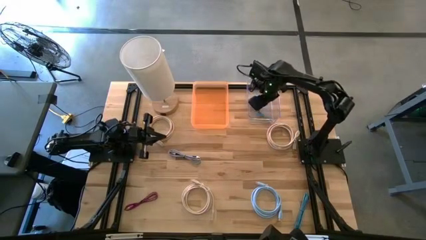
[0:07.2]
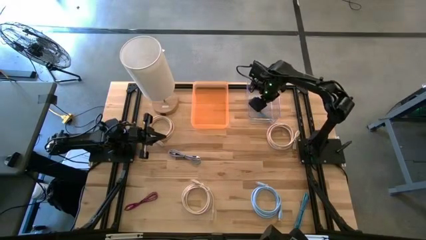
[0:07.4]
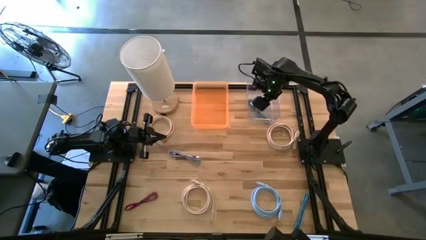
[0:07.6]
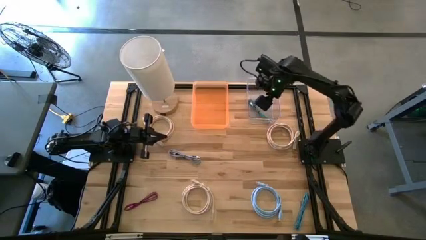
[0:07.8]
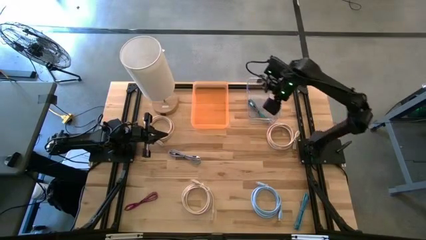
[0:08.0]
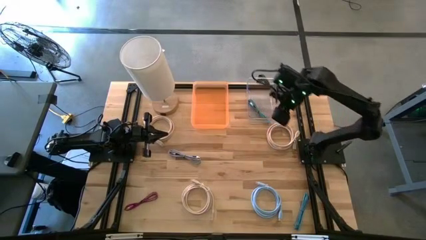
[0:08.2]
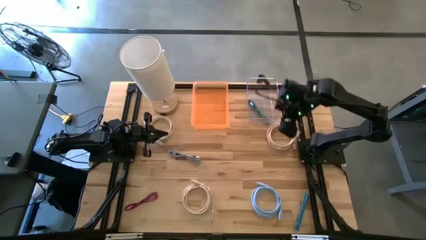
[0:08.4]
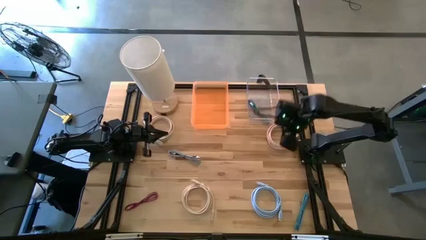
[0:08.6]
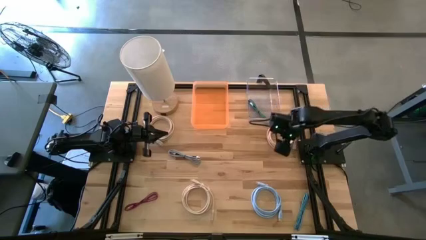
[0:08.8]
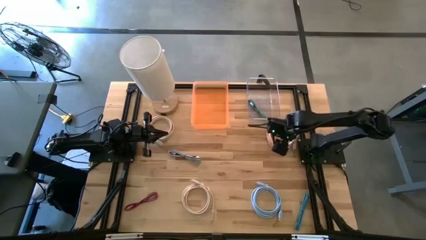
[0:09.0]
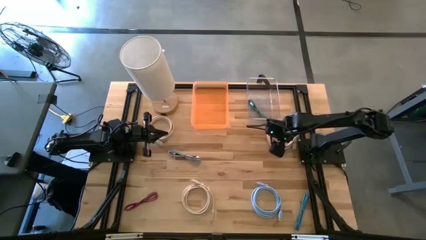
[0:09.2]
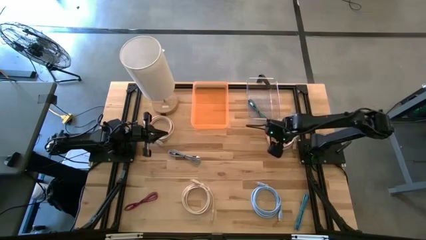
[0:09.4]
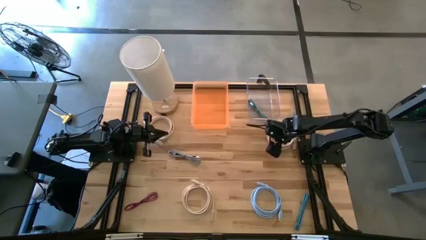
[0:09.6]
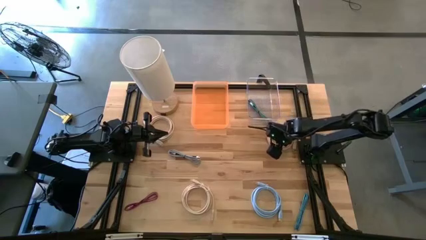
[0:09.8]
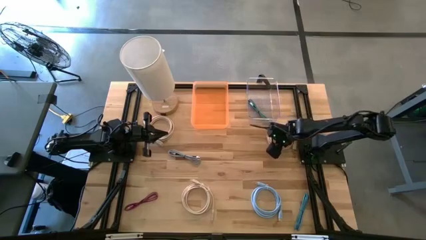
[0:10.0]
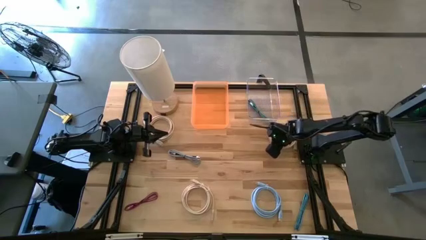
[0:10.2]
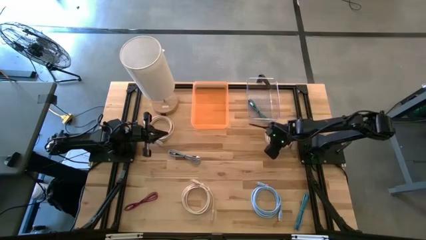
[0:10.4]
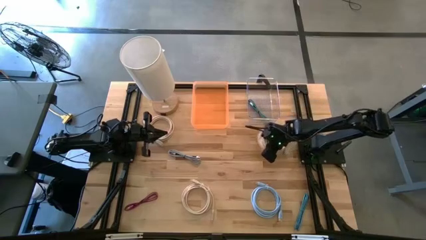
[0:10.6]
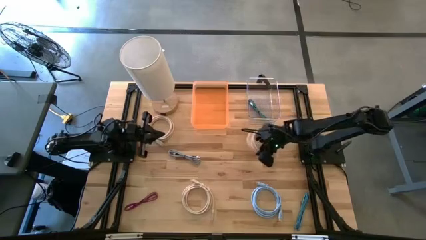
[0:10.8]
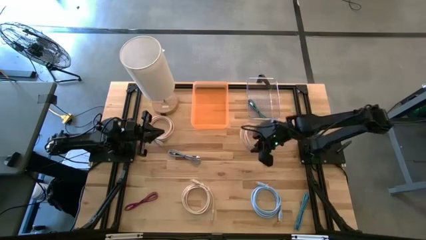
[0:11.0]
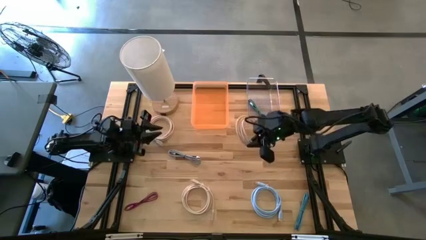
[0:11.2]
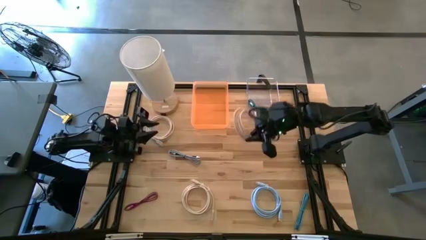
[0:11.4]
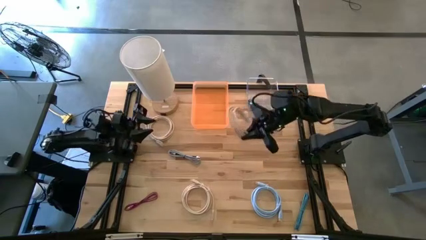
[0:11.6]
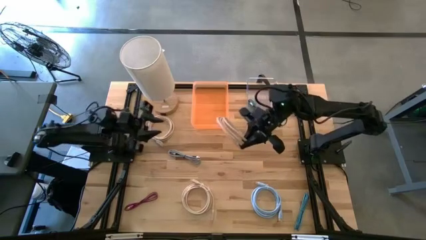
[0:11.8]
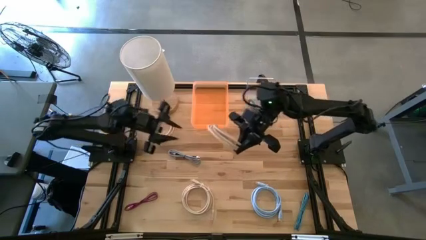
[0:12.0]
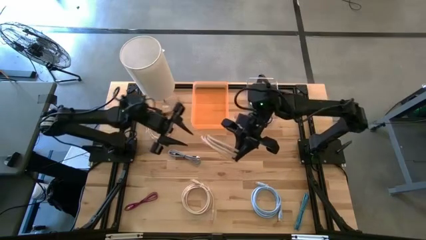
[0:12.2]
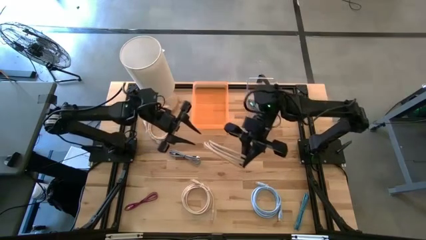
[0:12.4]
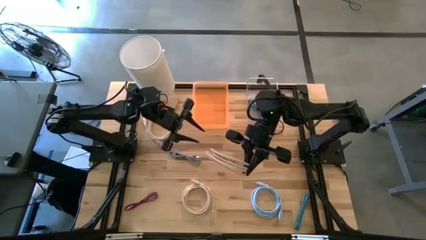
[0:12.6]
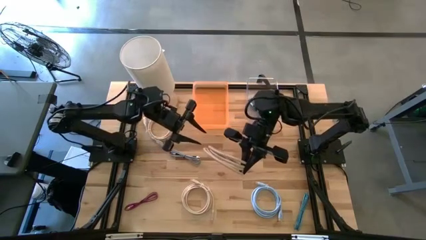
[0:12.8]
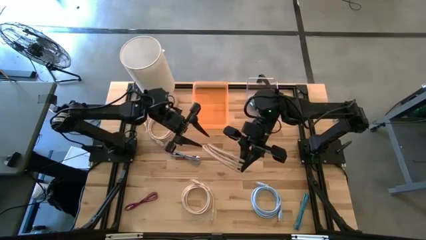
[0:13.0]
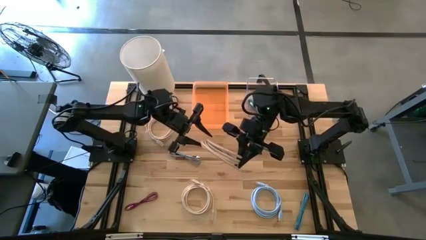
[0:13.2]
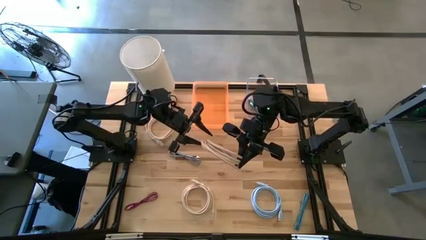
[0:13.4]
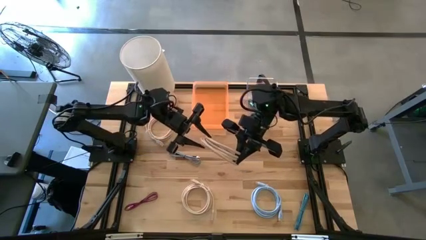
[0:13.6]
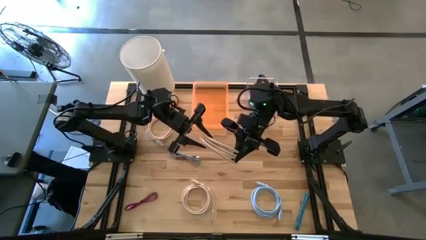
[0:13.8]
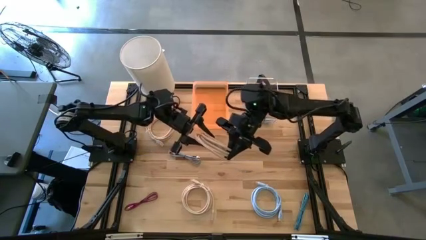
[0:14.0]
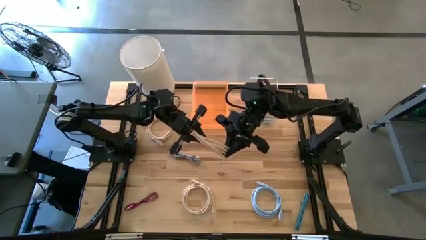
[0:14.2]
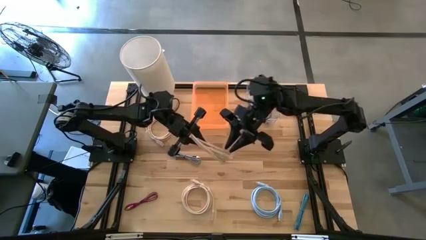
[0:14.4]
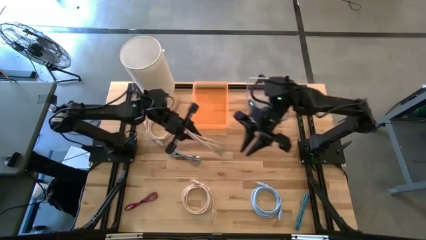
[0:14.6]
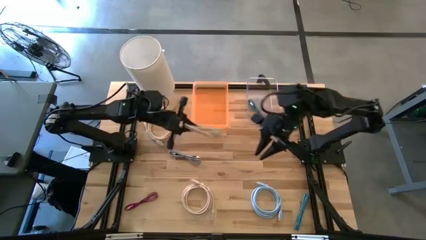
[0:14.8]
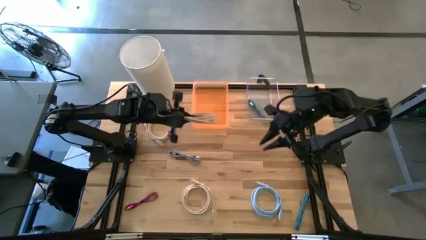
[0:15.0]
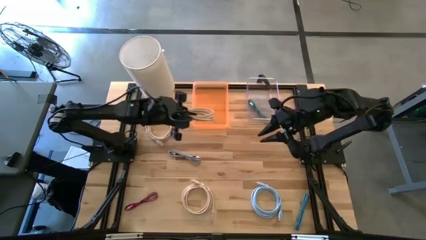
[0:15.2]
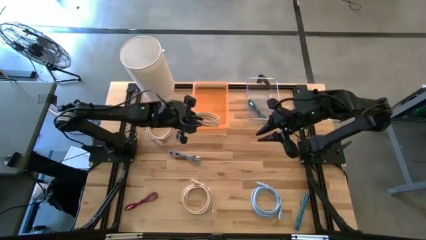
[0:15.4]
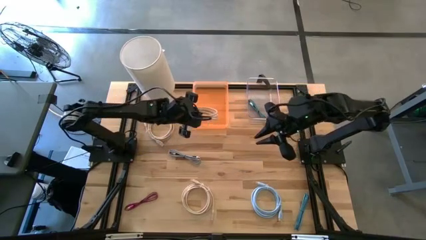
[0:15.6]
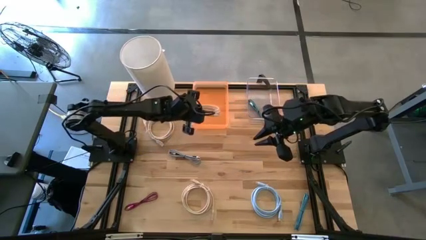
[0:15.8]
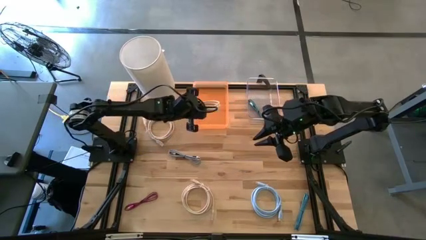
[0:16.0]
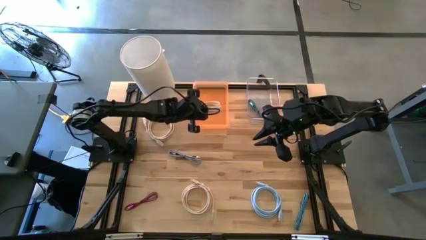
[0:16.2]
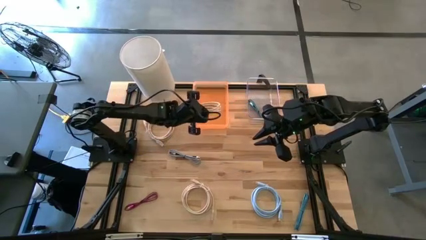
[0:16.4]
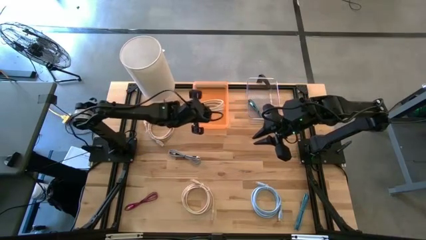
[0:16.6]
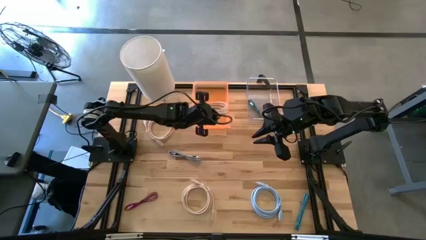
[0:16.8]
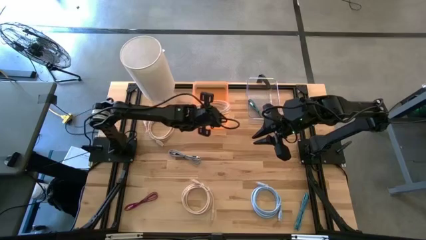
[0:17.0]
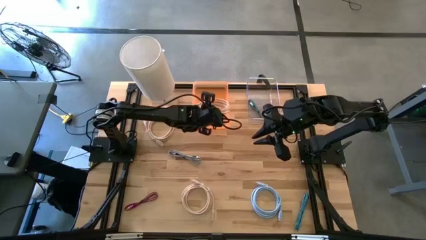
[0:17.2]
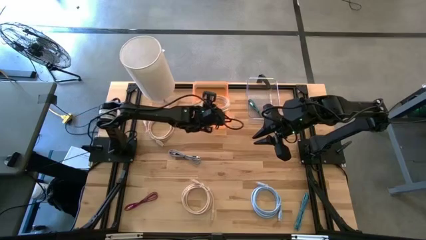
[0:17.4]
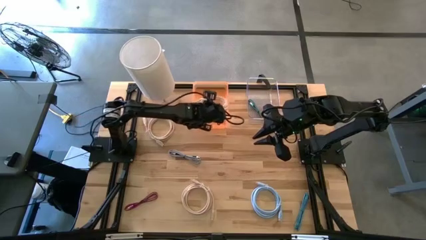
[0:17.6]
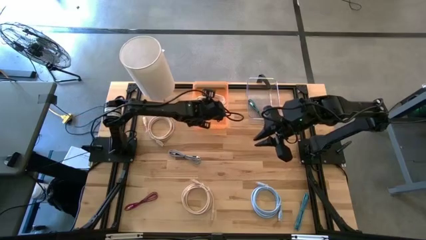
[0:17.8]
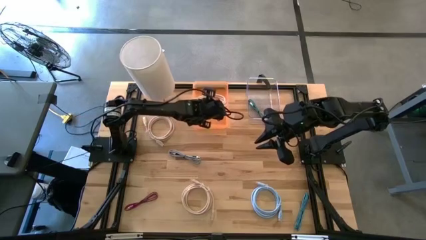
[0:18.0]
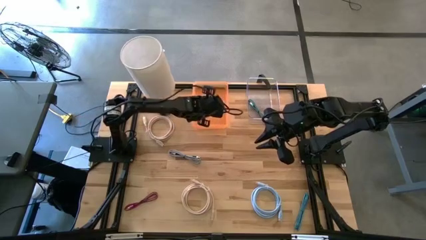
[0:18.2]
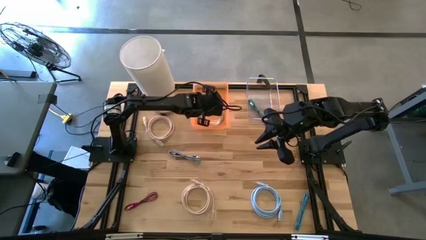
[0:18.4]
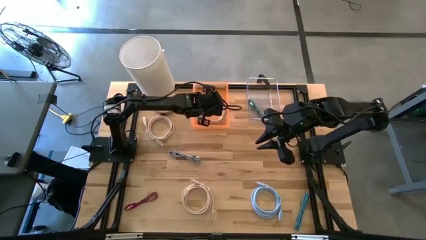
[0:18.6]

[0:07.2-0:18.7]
Task: Pick & Place USB Port
Put the top right light brown HDMI cable into the orange bin

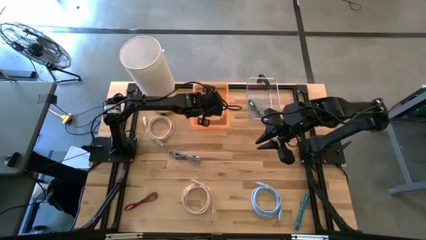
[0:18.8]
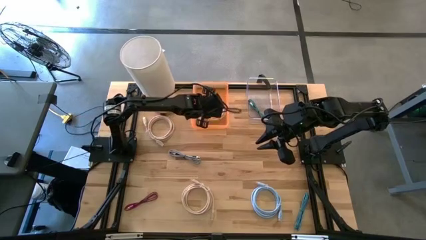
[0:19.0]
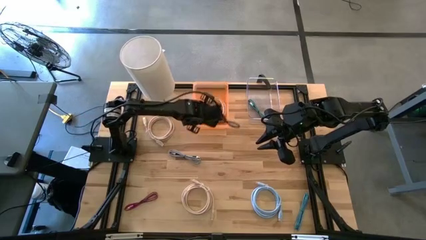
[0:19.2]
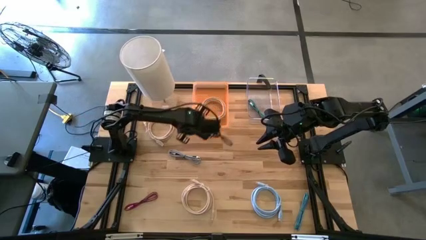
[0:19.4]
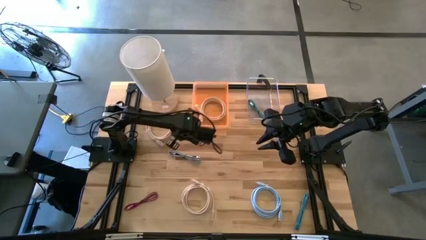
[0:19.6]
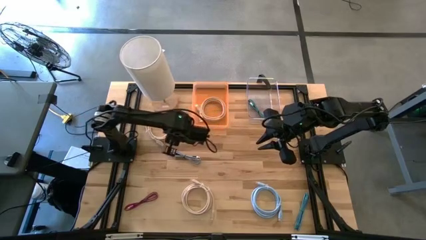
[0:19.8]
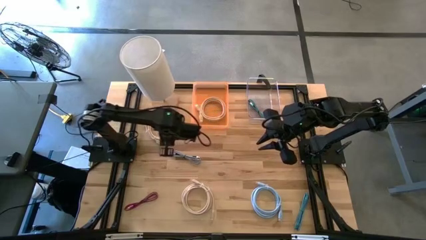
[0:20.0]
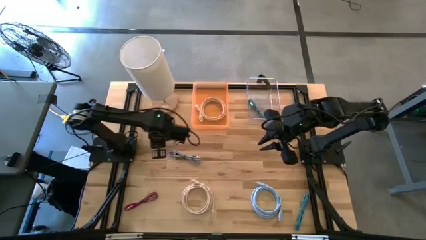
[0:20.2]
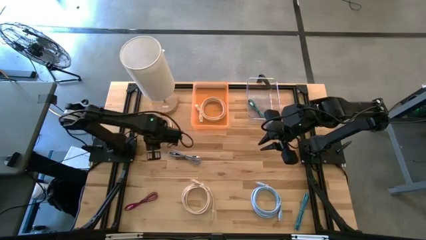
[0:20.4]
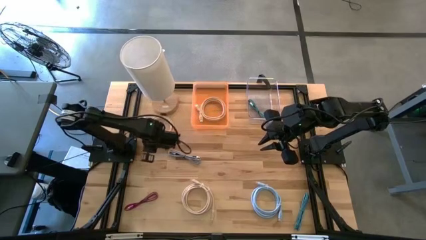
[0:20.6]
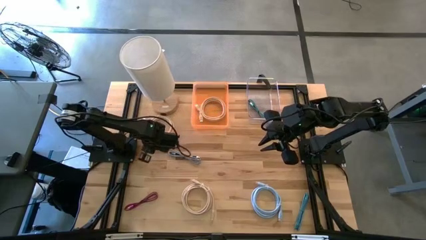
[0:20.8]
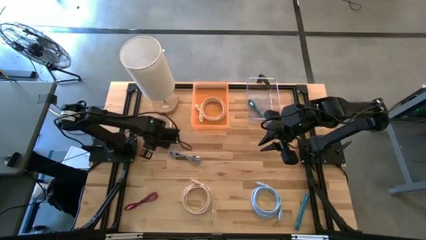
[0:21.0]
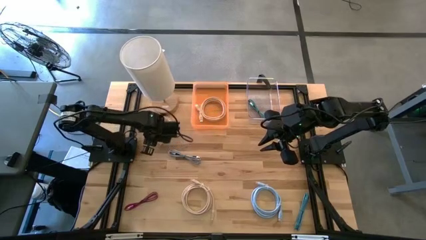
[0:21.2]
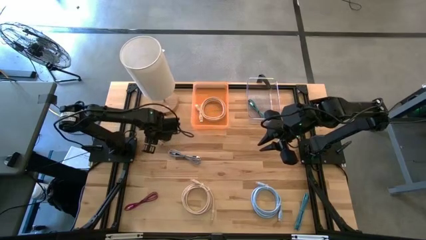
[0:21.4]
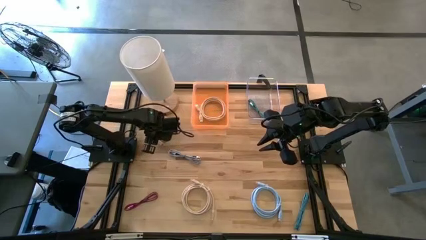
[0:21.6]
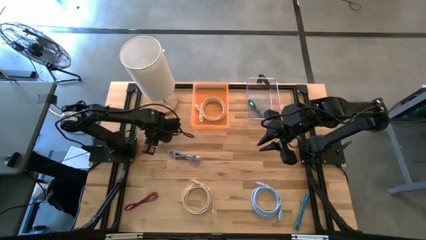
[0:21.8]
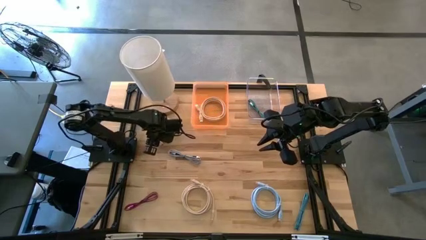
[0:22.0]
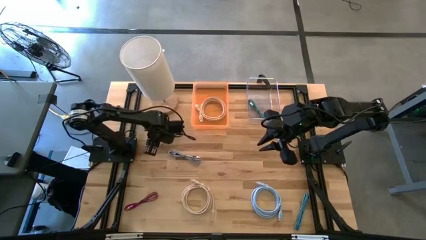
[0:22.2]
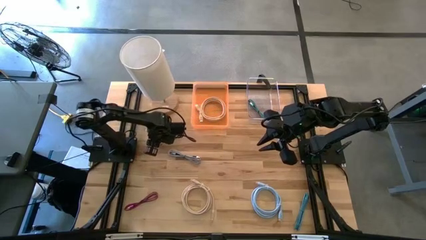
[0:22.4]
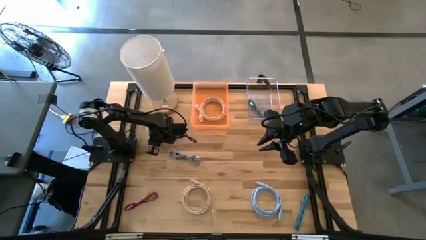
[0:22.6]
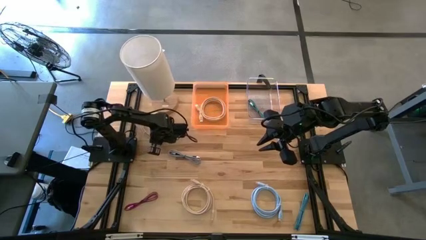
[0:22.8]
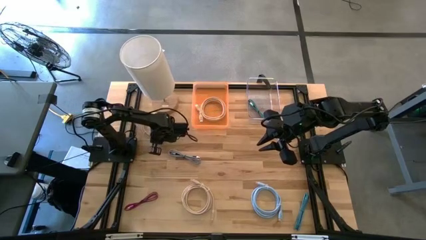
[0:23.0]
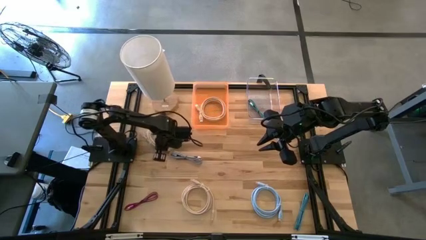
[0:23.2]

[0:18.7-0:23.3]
Put the top light brown HDMI cable into the orange bin
